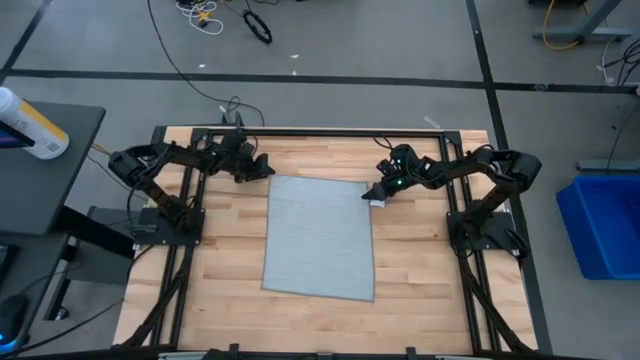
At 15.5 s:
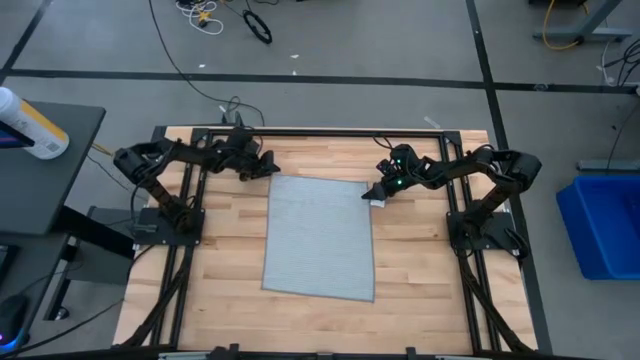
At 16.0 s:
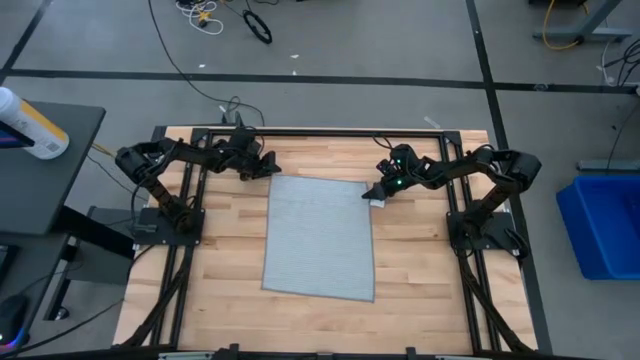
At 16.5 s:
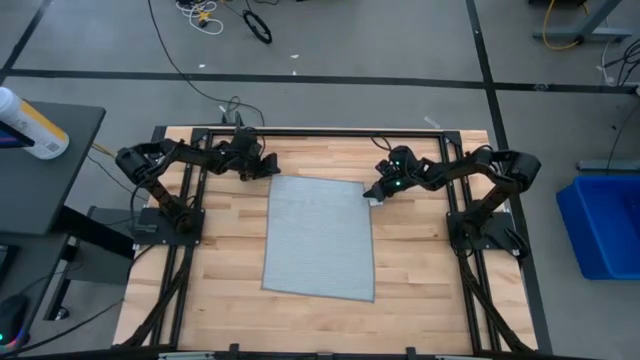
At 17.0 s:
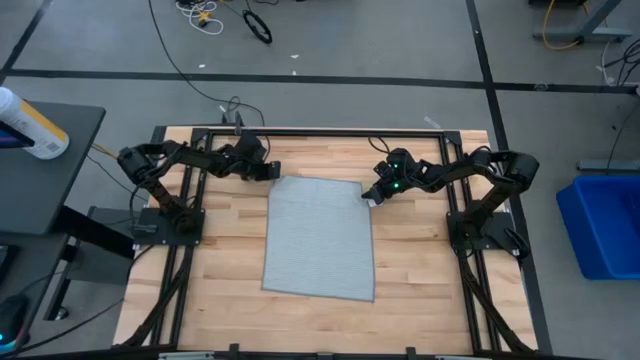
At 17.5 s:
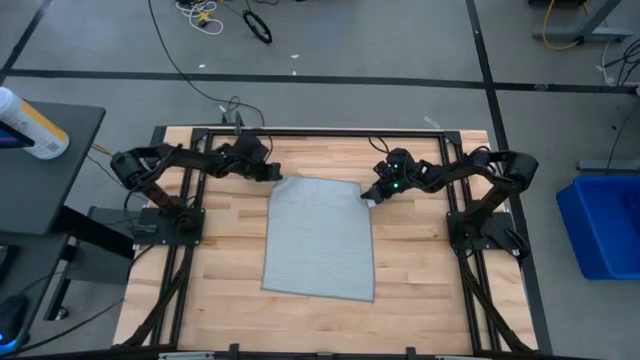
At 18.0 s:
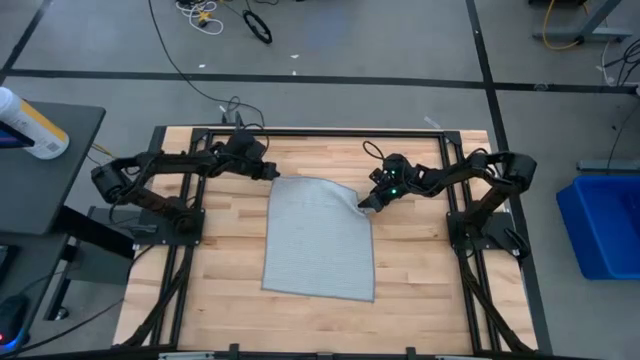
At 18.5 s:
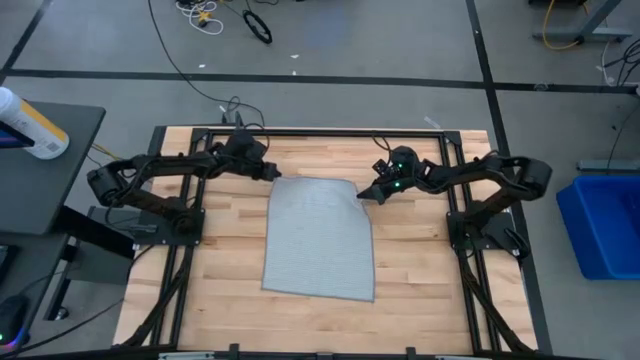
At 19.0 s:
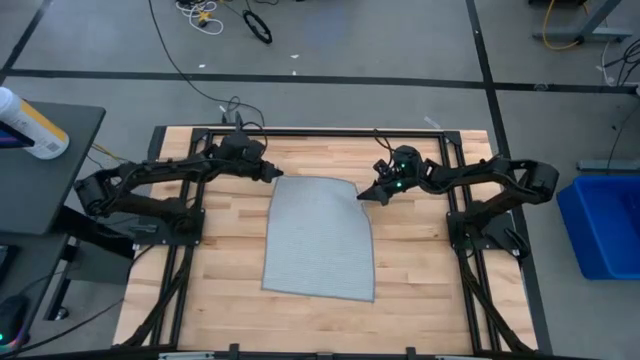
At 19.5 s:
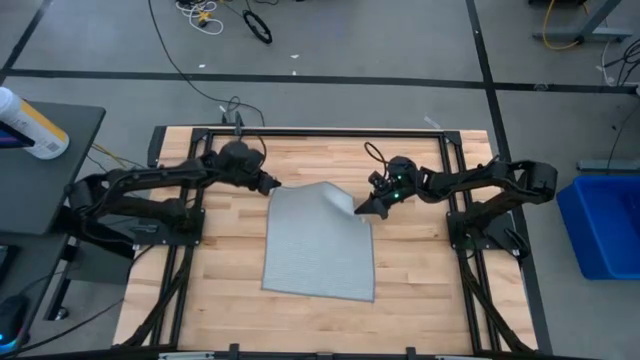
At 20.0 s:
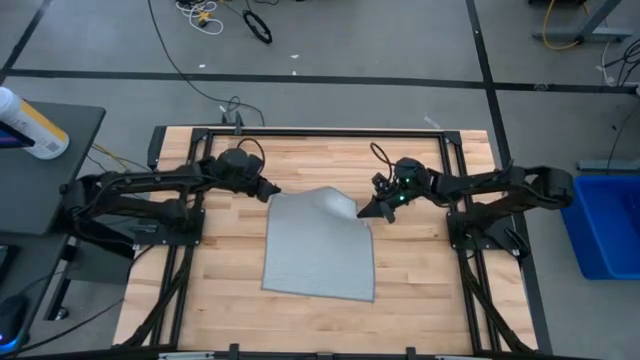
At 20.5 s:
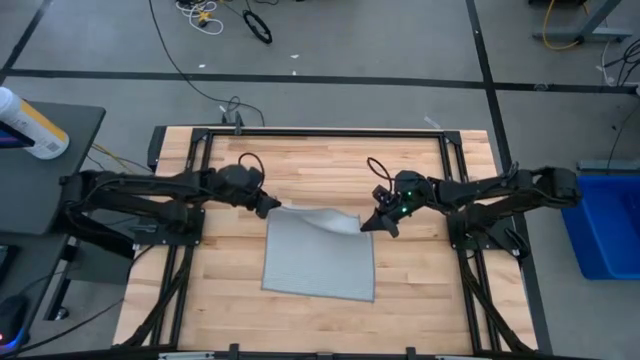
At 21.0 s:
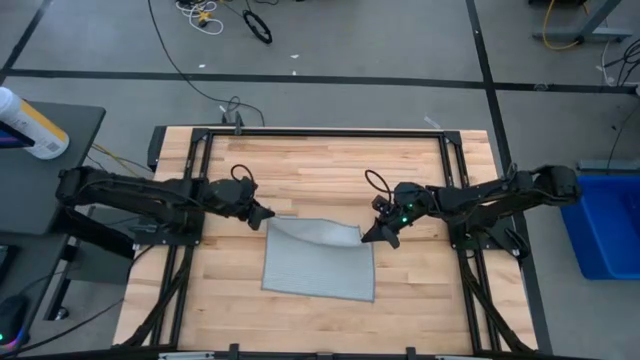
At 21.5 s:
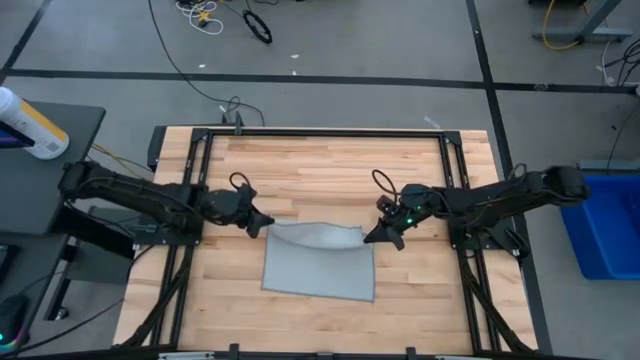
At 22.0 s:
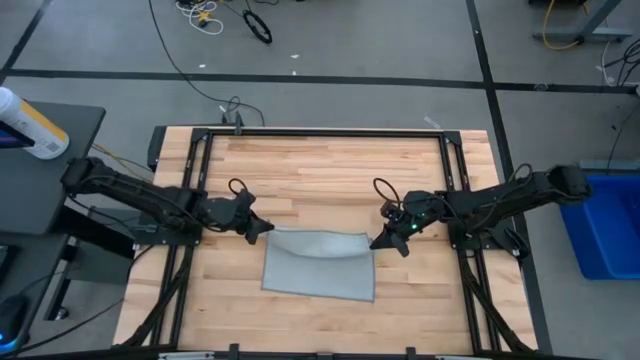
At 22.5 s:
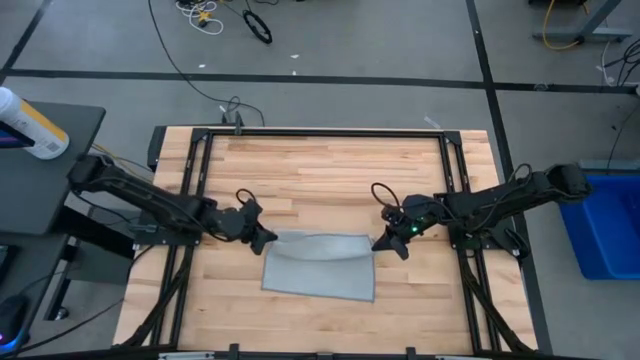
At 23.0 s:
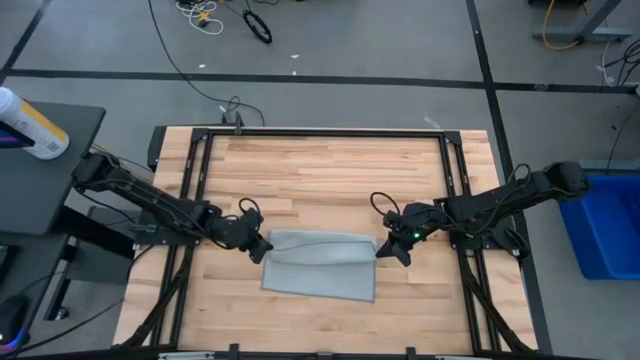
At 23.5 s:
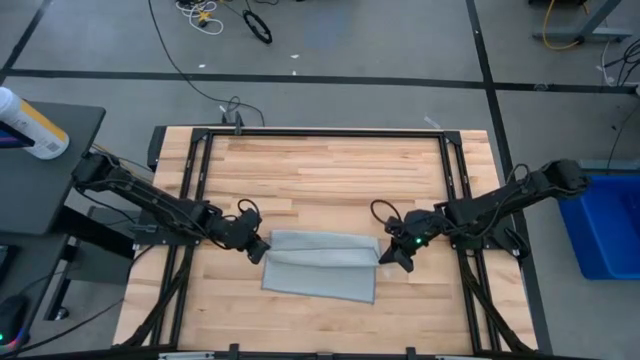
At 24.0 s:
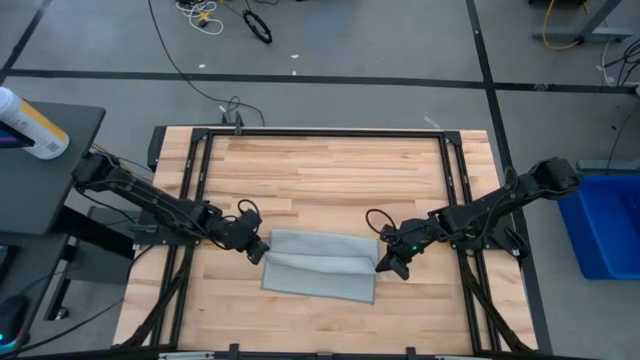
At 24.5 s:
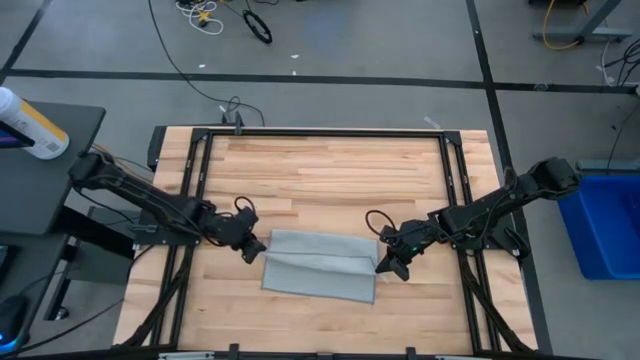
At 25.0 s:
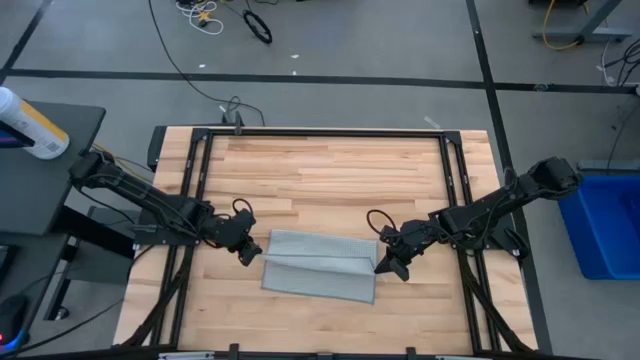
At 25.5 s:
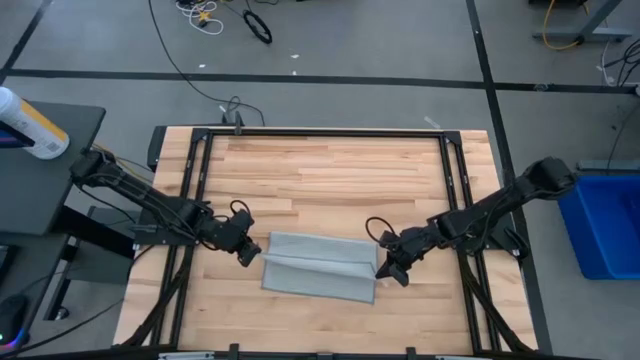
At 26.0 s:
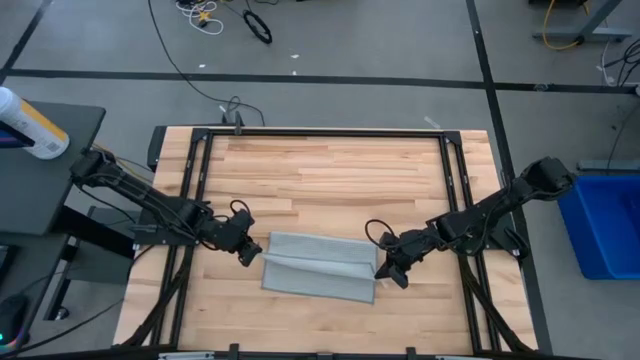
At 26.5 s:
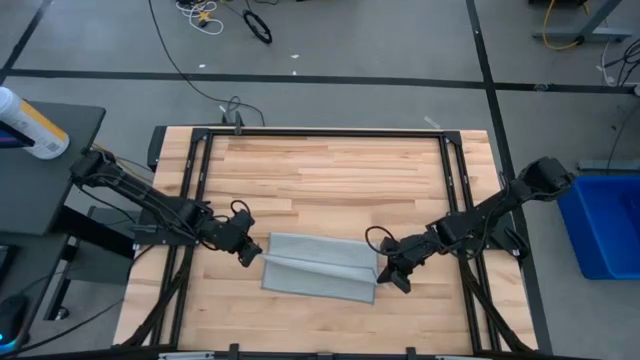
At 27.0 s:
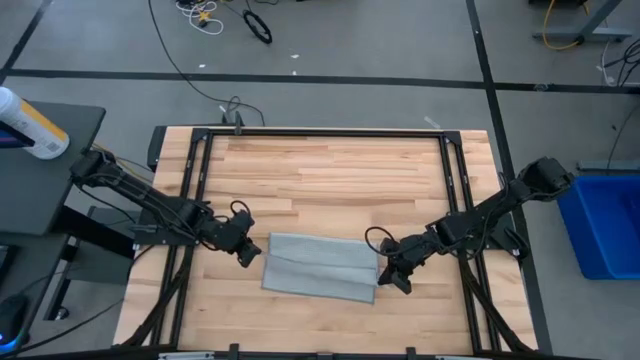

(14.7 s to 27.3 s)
Task: Fold microfiber towels
Fold the grey towel

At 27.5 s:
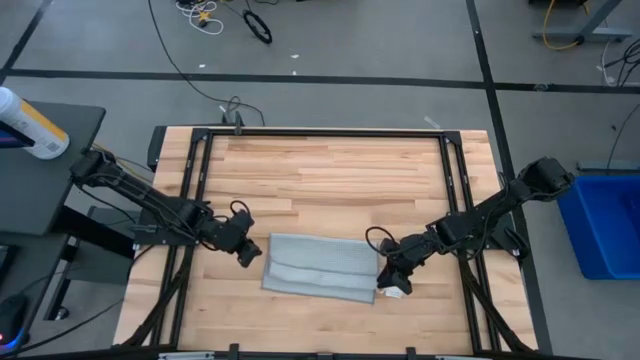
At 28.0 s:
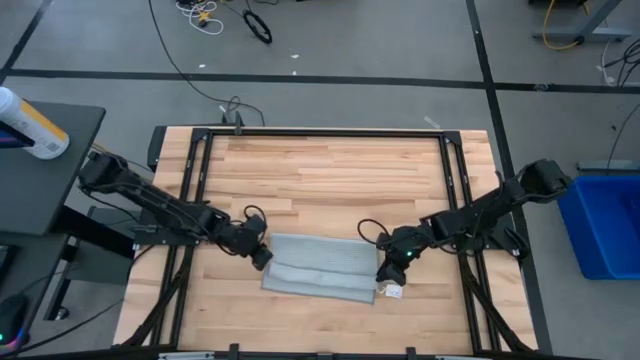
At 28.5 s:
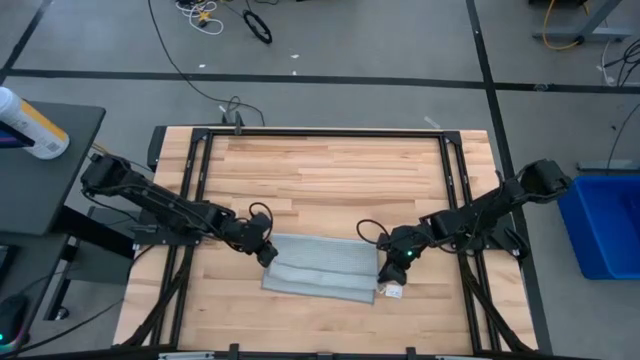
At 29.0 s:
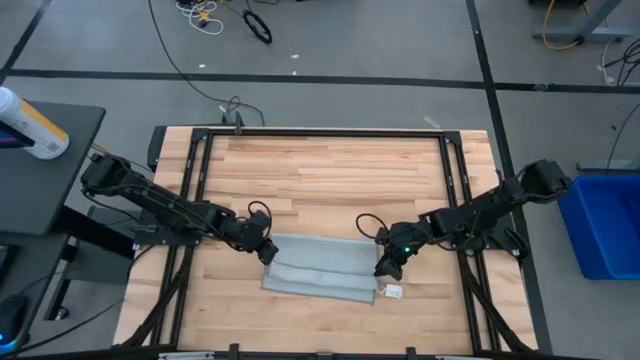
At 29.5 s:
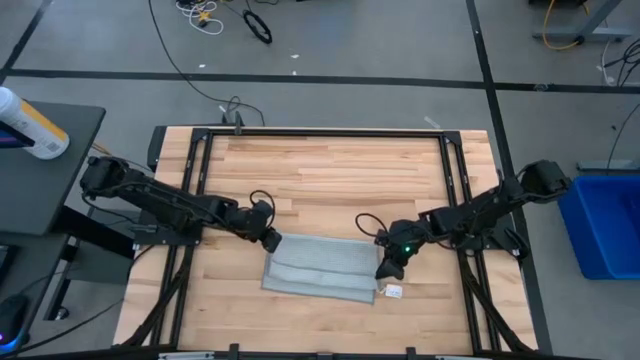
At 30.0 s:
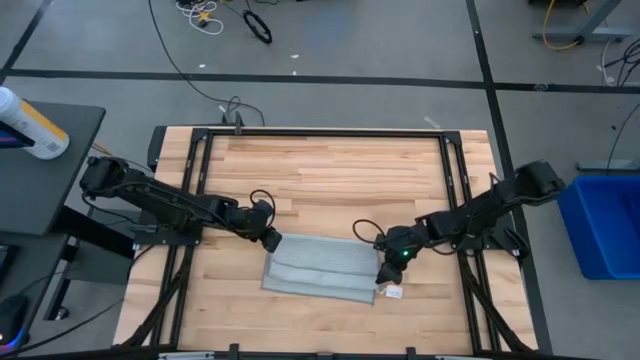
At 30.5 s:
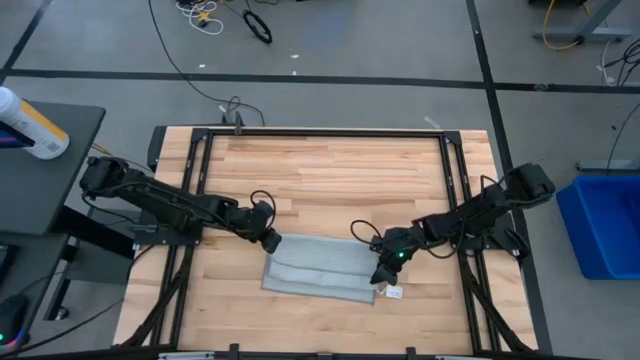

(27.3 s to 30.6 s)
Fold the grey towel

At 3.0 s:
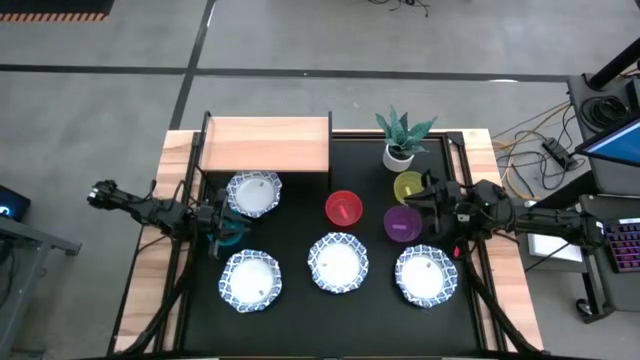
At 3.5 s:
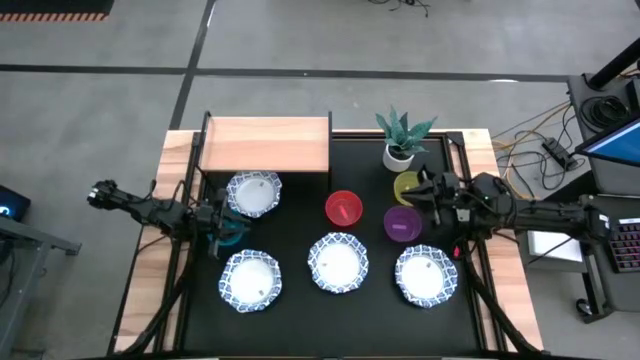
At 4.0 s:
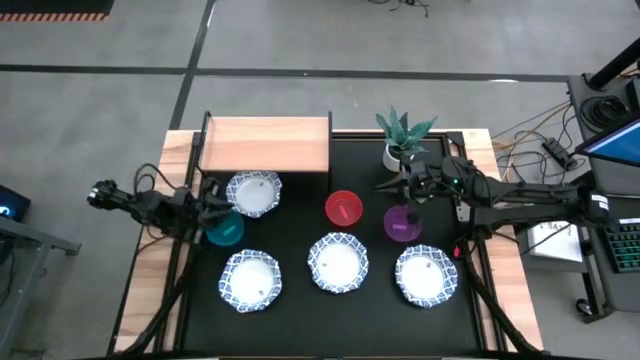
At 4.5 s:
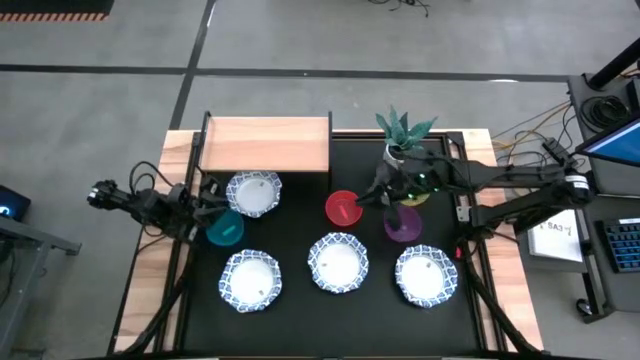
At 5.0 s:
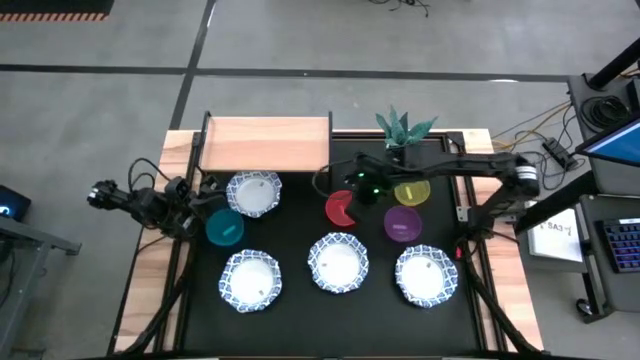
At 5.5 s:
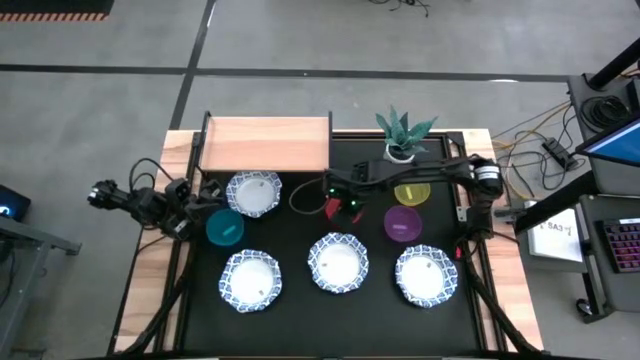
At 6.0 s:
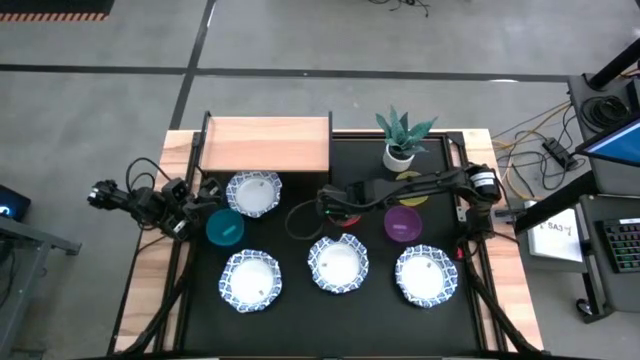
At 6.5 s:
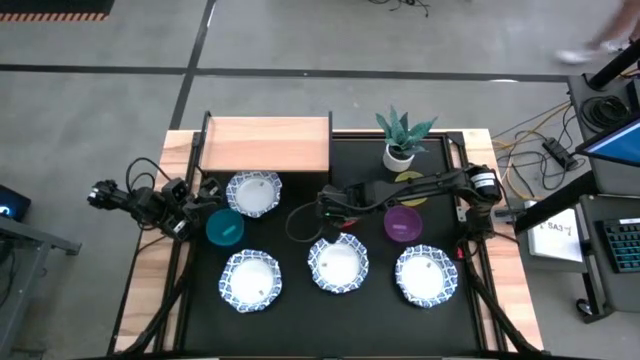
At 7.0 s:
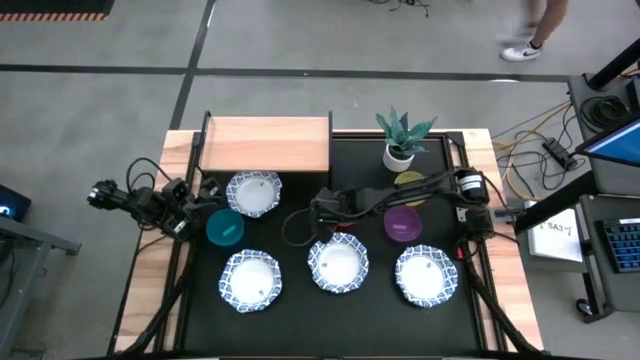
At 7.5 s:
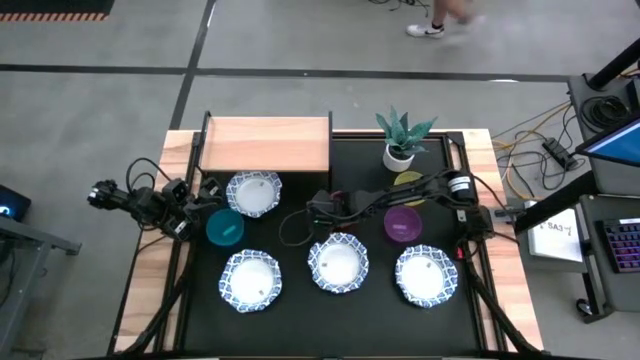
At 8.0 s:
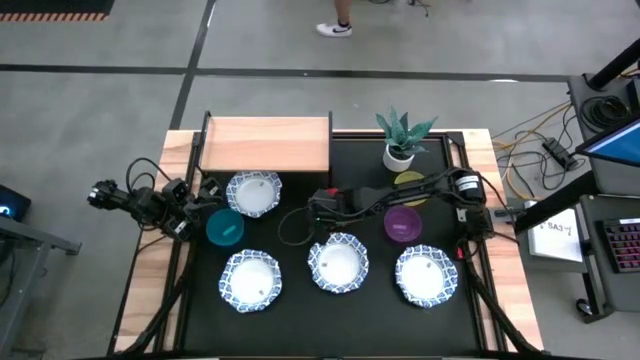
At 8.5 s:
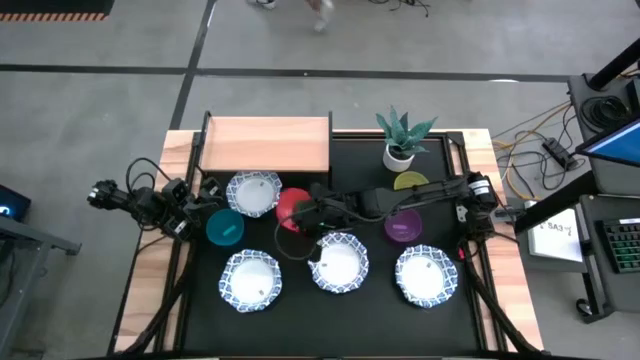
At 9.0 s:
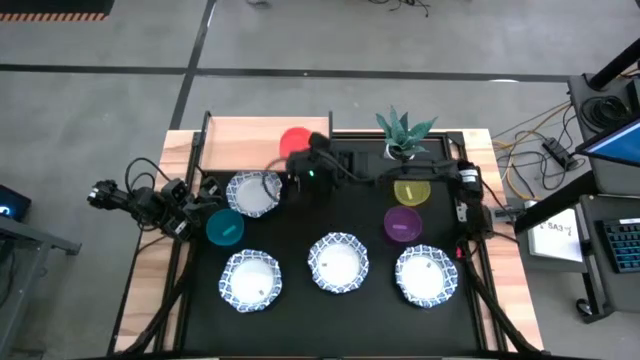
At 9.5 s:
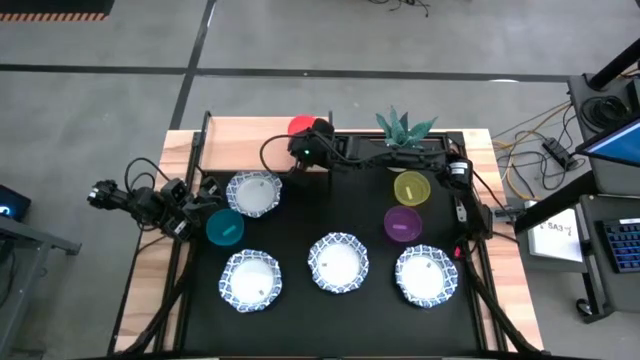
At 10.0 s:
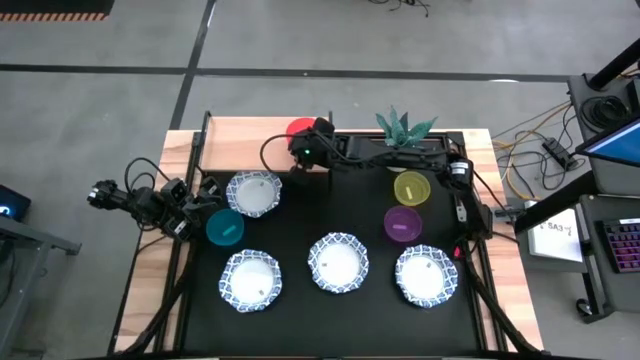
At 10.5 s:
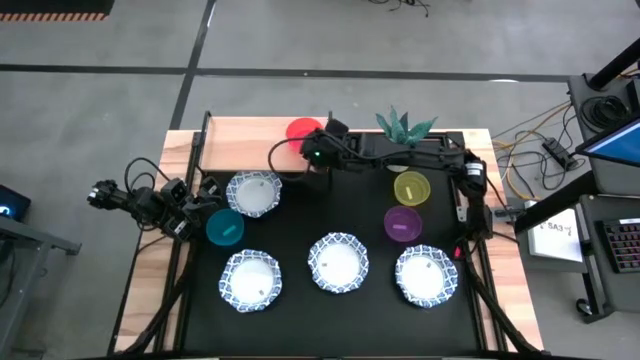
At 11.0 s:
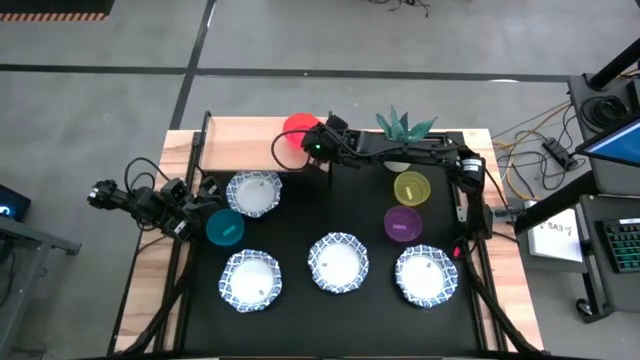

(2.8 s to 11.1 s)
Task: Place and stack bowls onto a shelf
Put the orange bowl on the shelf
